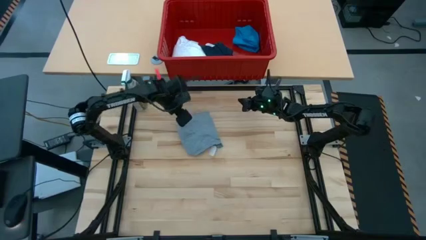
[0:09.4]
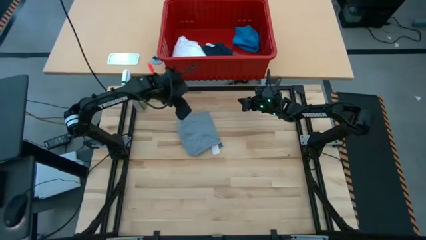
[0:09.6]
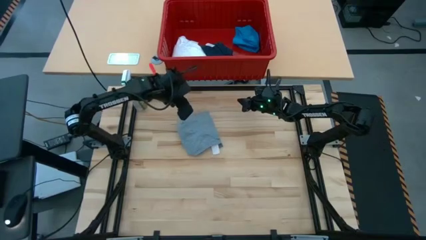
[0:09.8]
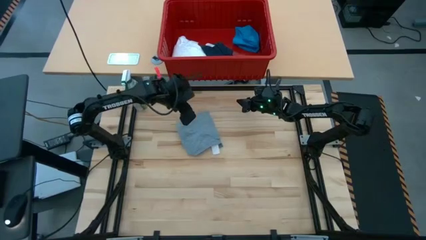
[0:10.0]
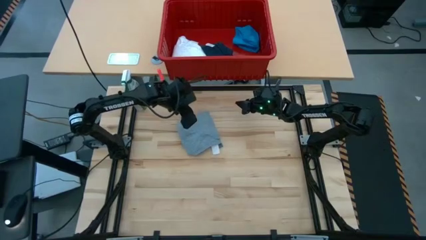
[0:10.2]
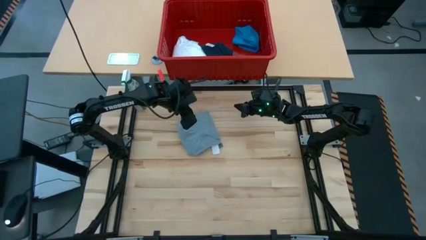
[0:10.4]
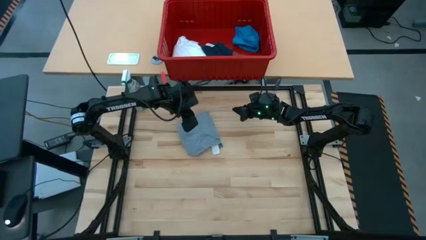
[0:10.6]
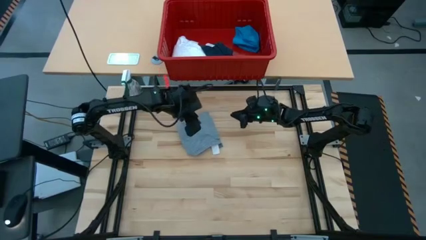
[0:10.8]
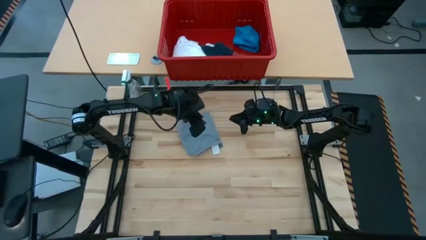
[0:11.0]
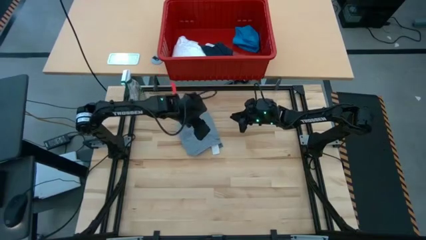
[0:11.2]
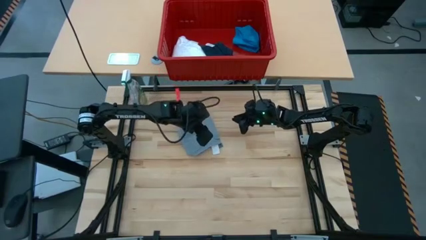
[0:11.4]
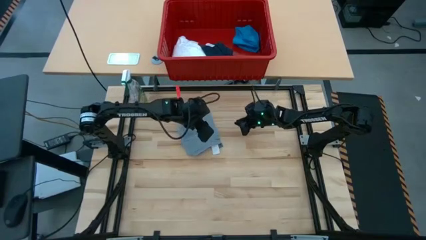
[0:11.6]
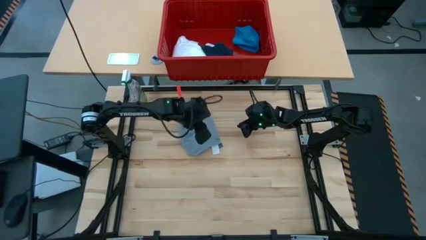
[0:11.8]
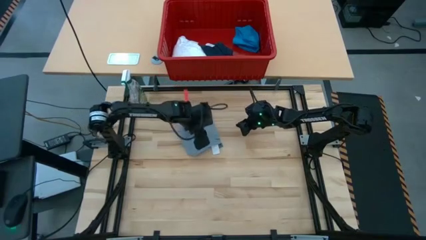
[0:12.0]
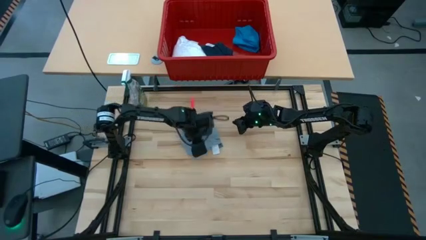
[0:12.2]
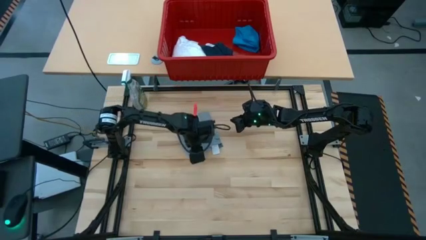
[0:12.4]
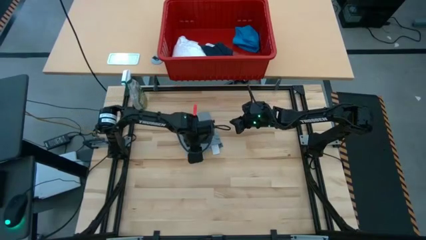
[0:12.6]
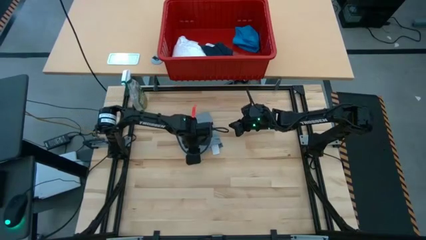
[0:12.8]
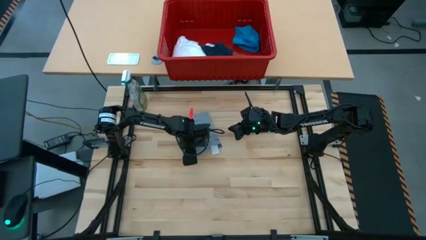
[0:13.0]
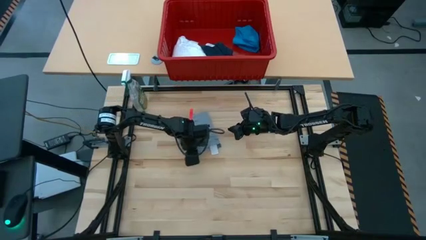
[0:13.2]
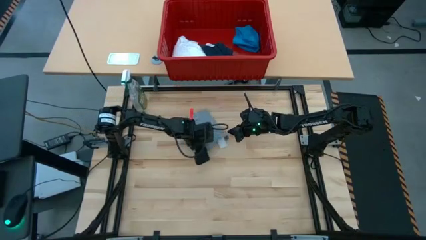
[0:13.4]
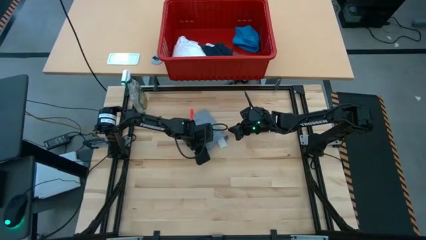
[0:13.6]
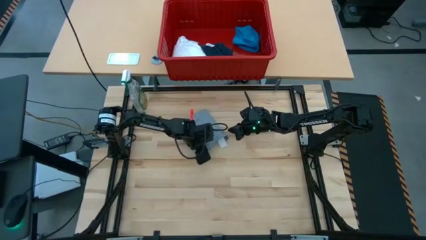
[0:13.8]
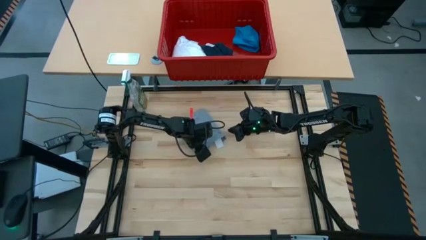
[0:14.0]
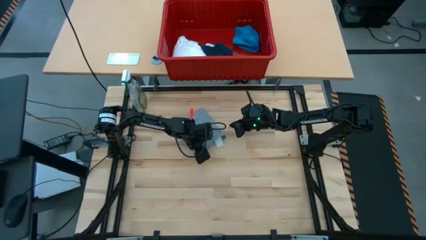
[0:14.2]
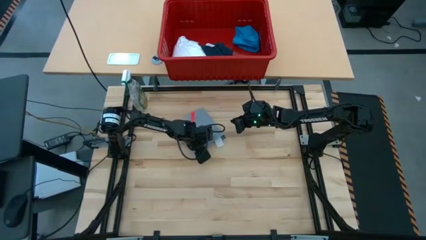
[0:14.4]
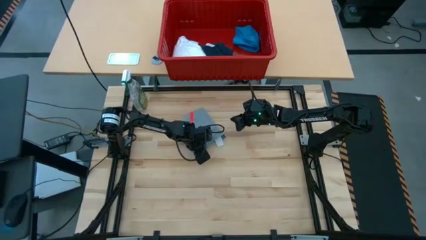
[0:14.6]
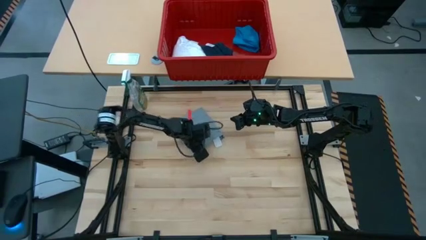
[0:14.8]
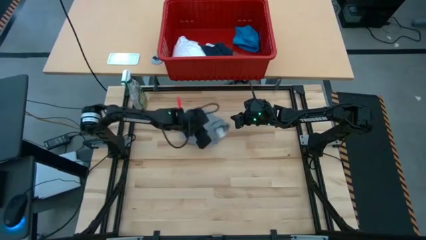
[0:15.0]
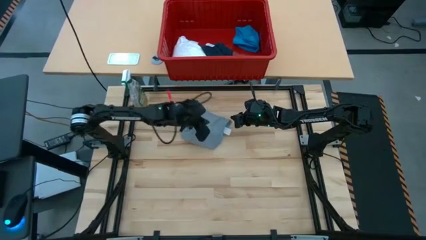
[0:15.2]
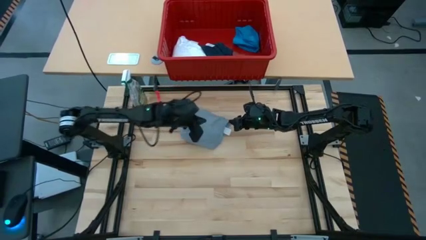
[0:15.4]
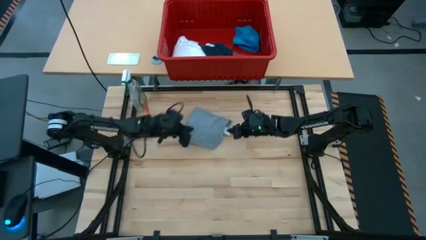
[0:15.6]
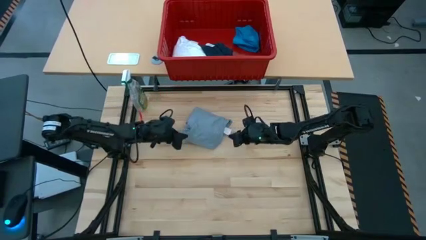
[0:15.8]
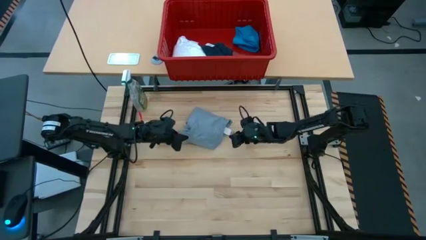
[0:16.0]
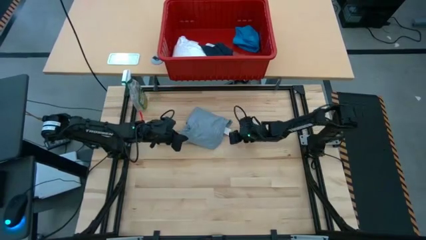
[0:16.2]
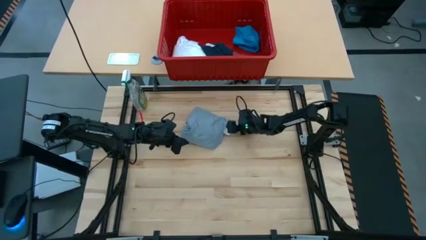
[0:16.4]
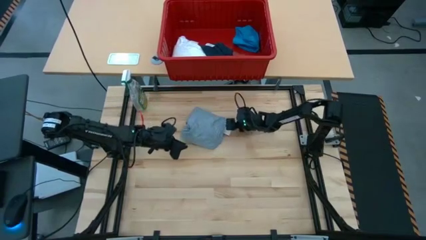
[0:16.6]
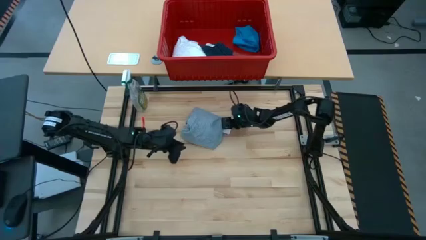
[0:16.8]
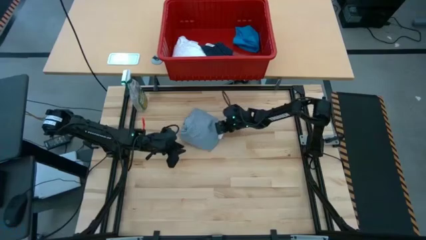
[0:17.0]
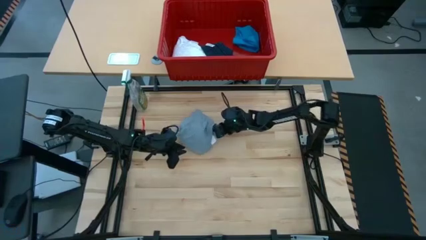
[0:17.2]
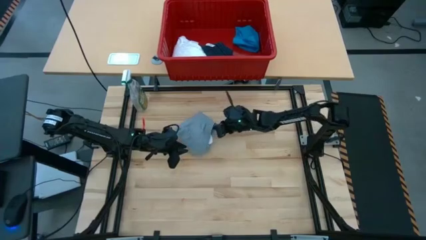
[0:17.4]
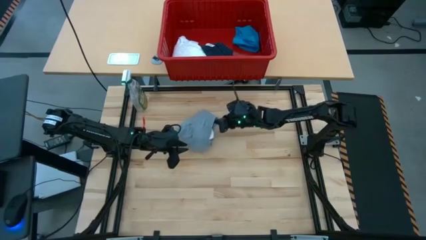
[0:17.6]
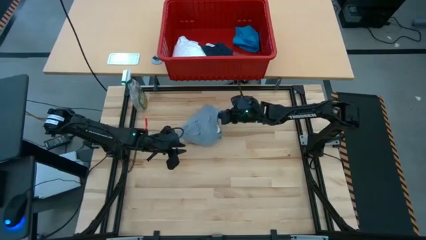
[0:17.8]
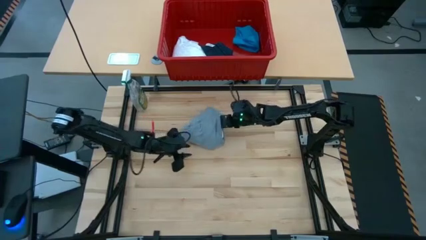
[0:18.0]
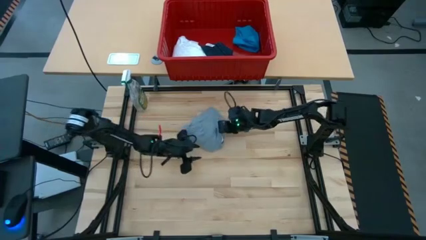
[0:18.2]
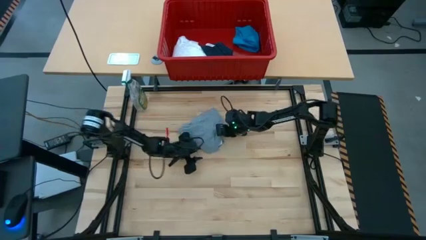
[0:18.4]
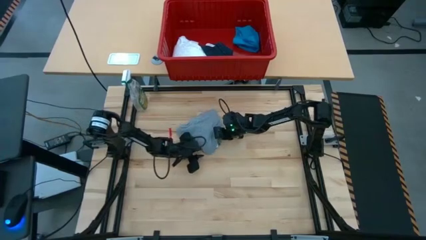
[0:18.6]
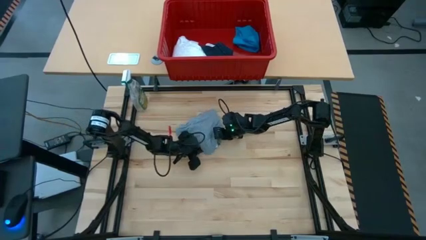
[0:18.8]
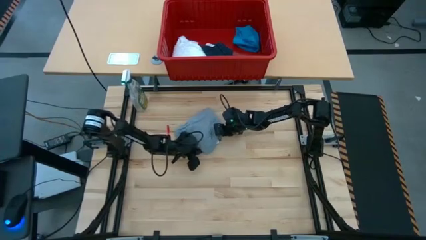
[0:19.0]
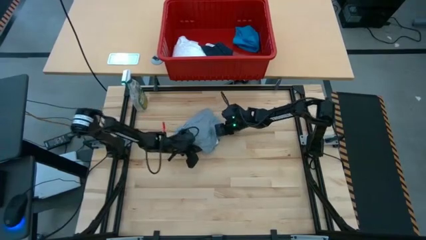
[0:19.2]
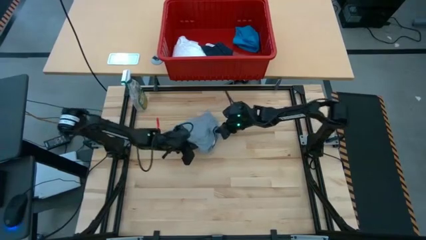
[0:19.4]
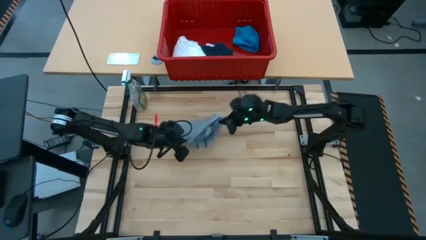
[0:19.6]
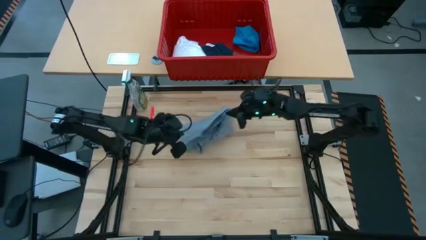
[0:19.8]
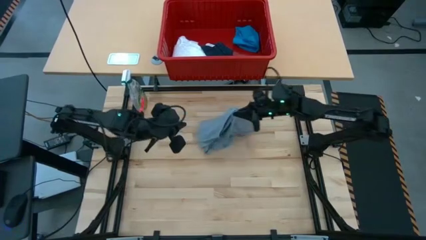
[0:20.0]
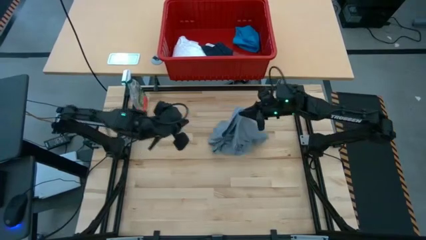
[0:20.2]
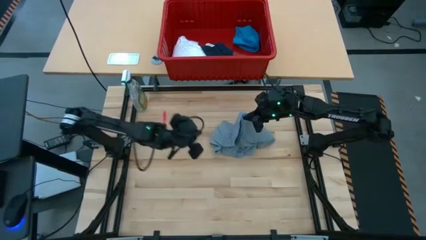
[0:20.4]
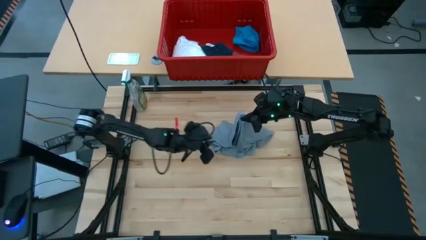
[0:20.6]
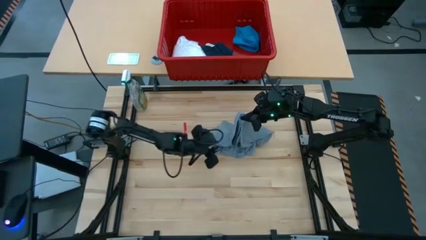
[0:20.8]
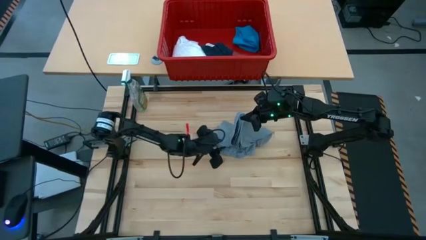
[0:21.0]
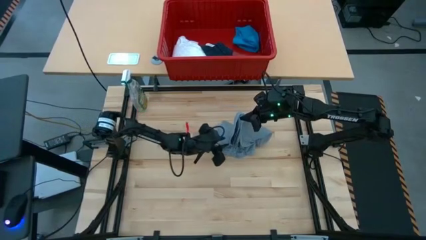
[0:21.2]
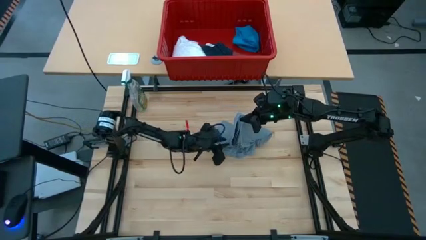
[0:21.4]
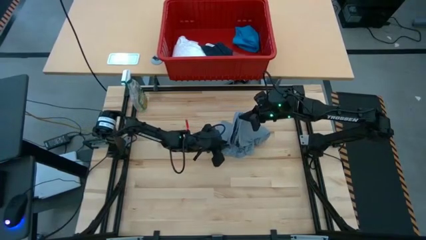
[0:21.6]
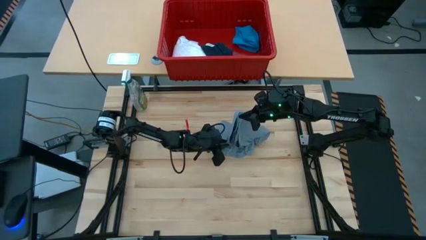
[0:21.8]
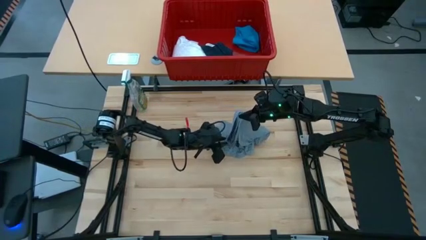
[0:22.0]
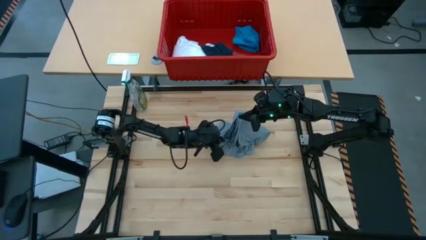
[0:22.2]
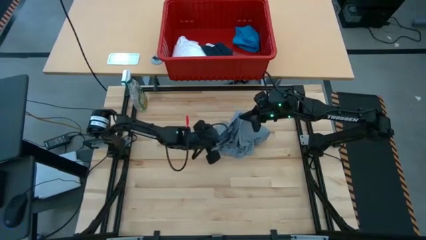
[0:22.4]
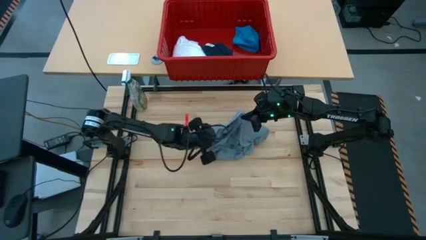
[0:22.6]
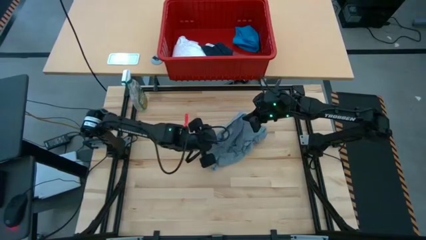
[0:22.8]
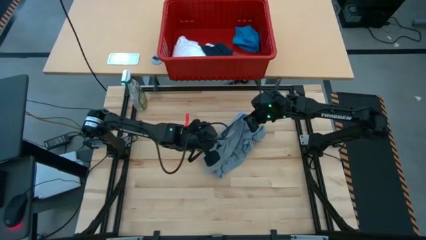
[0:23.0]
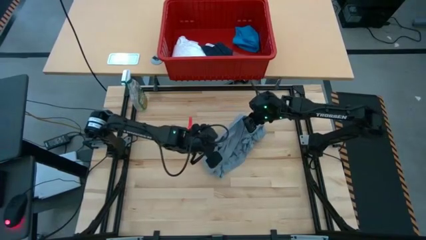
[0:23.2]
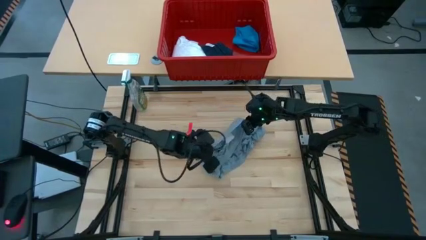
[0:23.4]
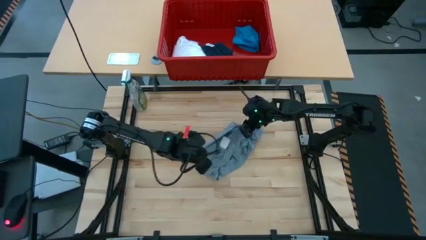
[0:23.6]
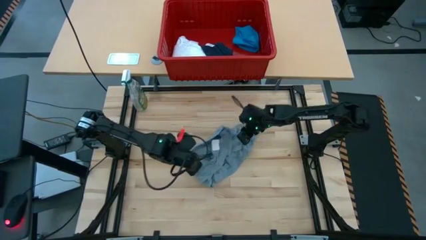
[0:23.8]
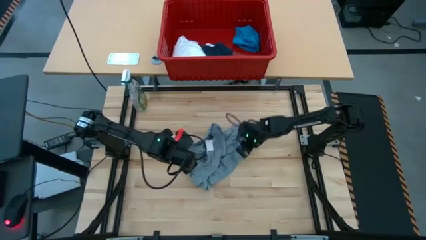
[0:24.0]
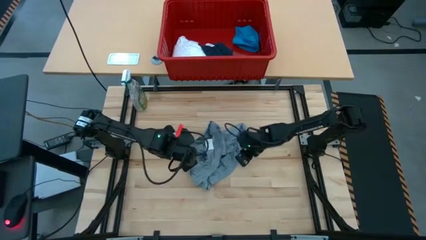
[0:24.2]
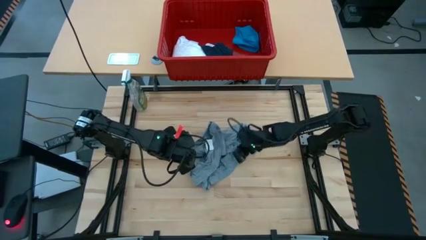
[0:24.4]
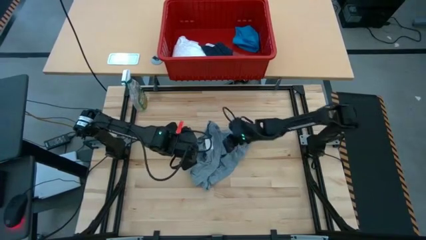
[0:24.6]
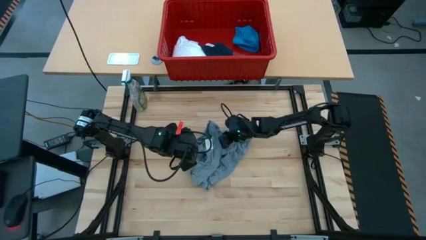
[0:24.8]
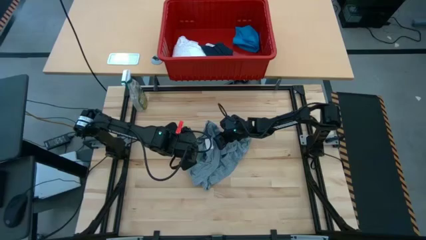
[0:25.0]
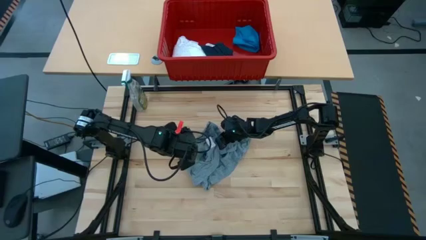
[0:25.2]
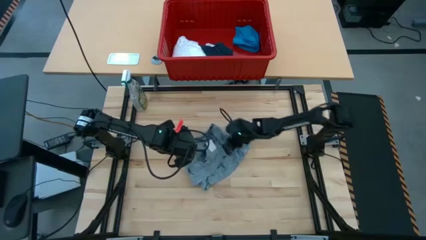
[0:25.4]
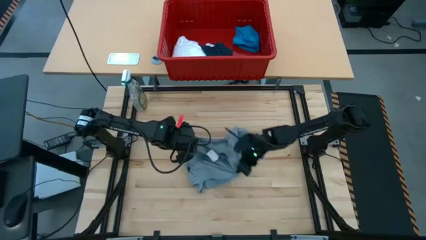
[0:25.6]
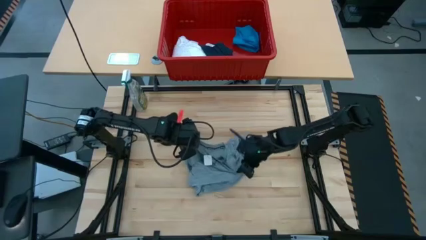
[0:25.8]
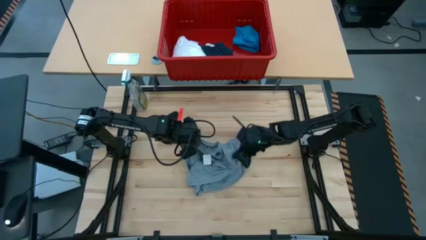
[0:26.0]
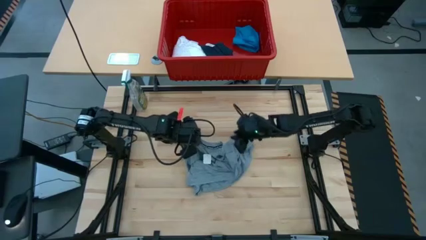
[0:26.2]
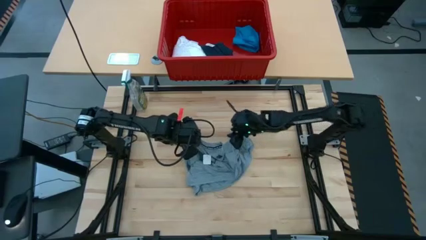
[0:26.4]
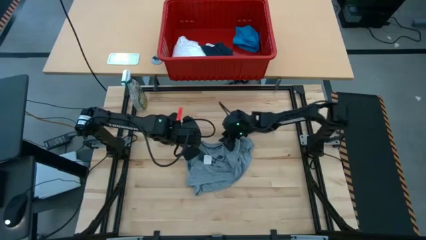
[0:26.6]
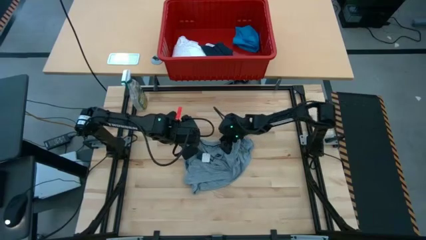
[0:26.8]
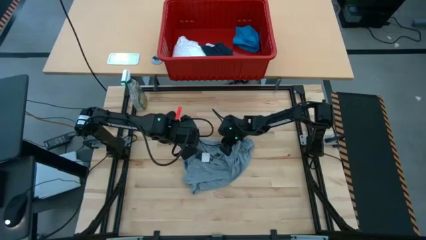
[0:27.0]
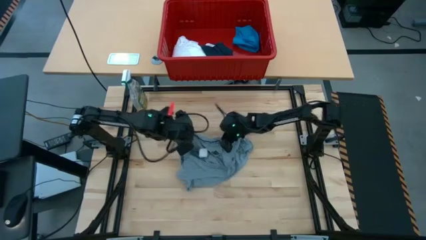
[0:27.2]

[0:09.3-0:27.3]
Task: Fold laundry
Fold the gray shirt
